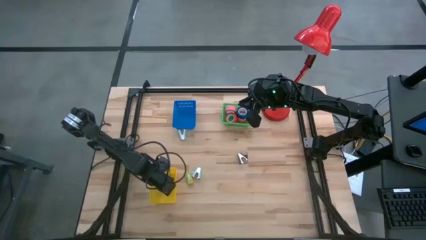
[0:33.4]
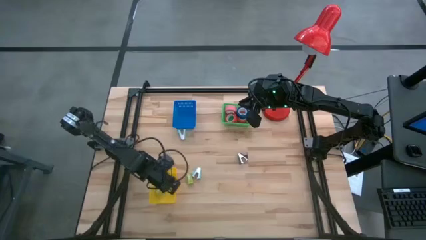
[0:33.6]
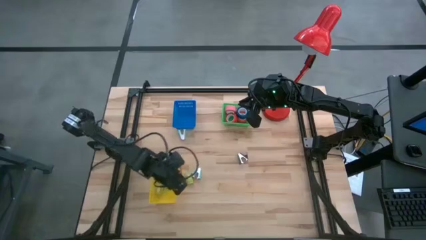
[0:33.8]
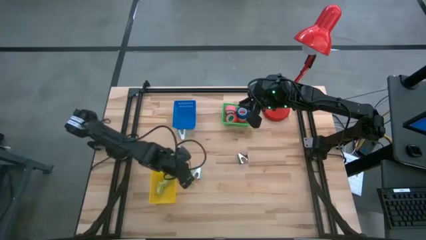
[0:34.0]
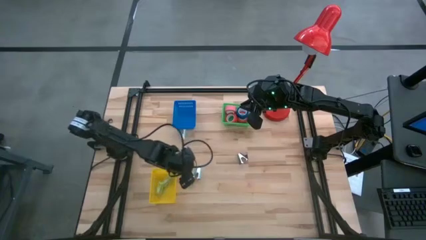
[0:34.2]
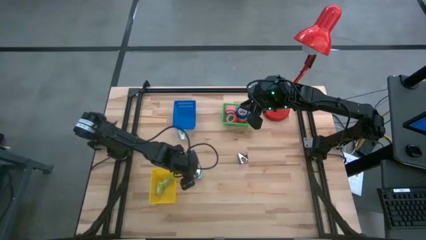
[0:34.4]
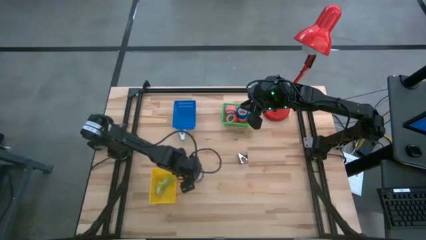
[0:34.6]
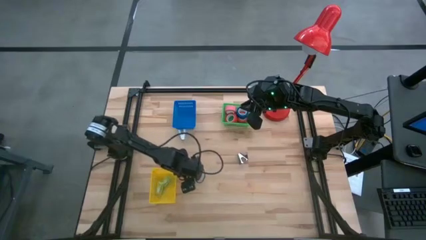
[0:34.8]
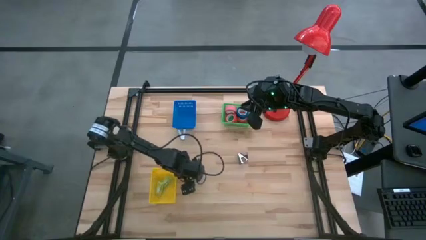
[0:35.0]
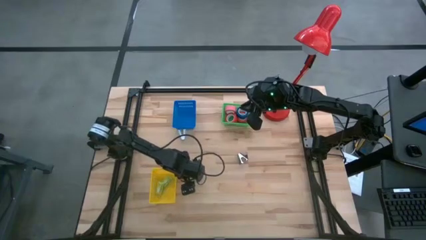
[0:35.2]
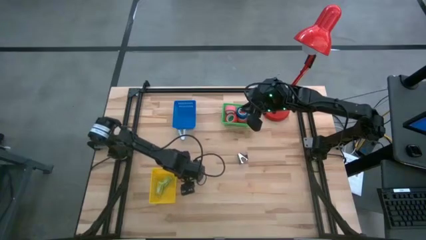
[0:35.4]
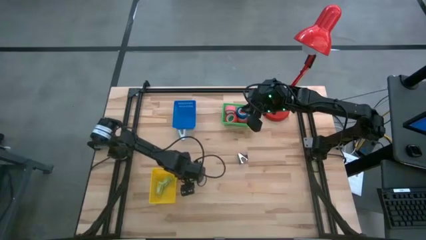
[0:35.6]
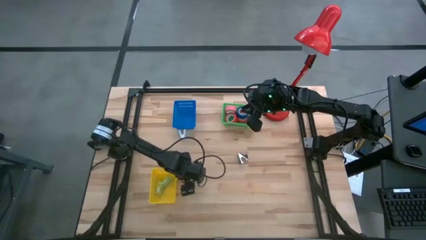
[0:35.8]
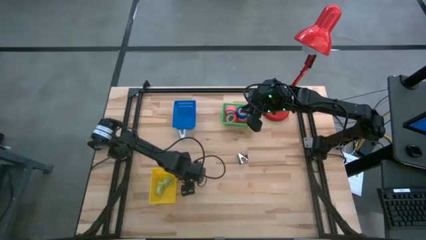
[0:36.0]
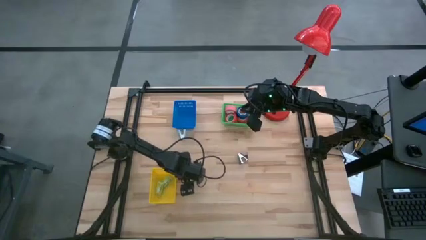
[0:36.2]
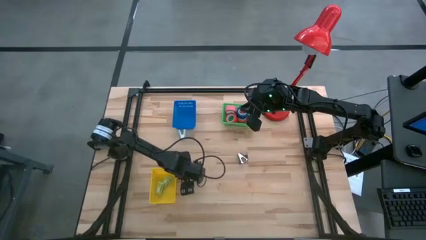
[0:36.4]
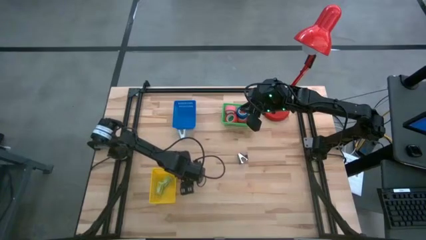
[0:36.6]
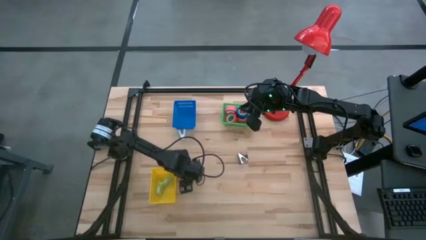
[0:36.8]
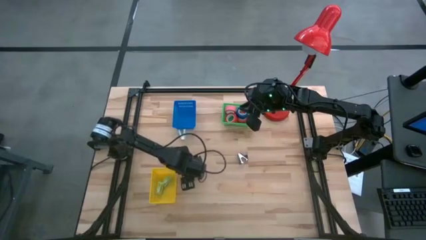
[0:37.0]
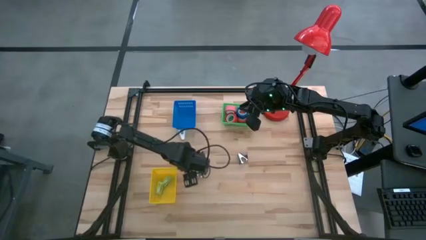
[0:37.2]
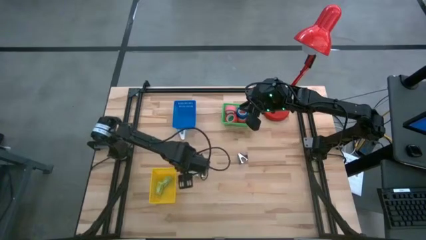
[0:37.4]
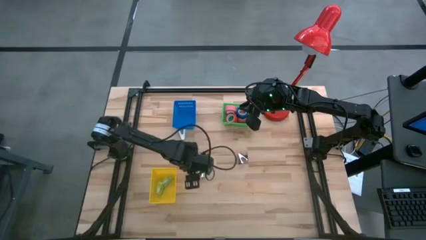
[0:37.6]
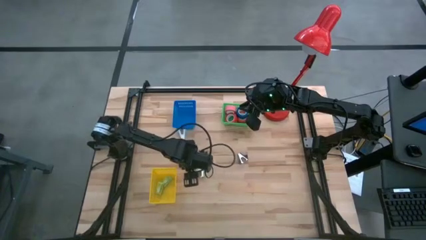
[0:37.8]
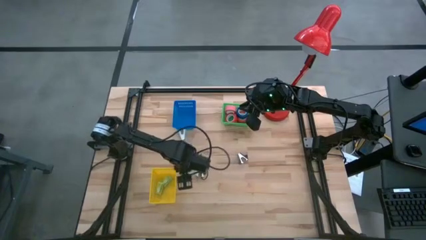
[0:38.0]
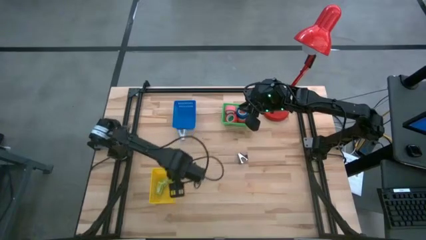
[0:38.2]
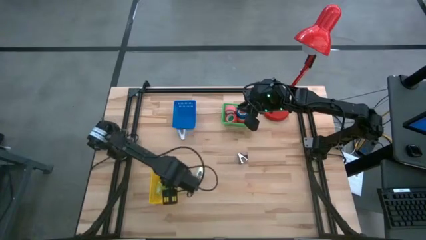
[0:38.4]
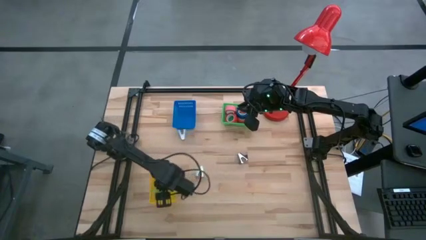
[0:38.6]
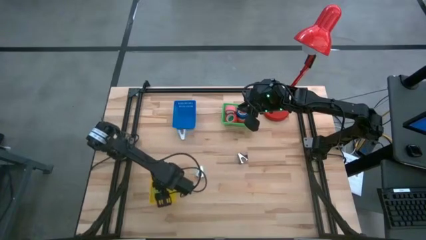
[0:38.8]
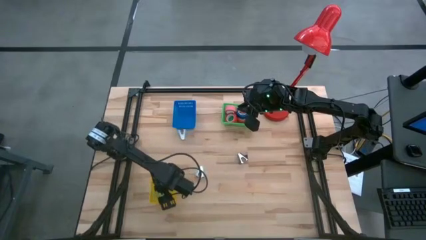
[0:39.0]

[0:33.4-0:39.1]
Task: Pick and place Stapler, Stapler remover, tape
Put the green staple pins into the yellow basket

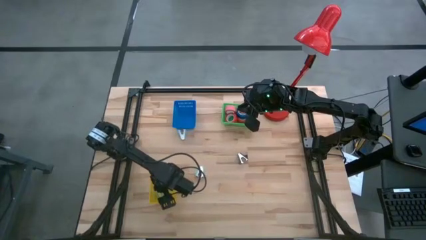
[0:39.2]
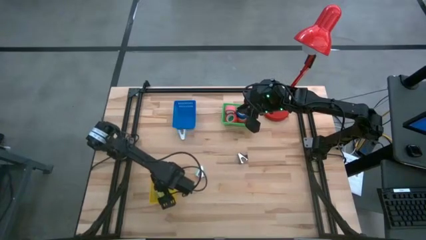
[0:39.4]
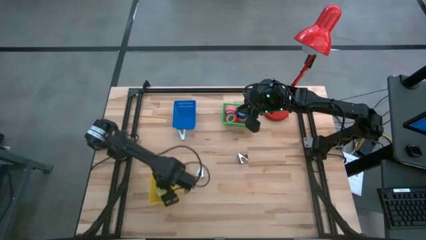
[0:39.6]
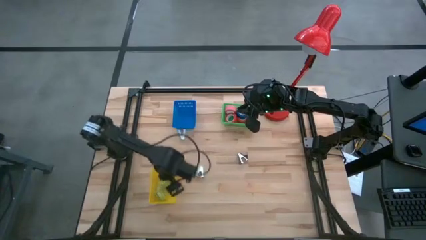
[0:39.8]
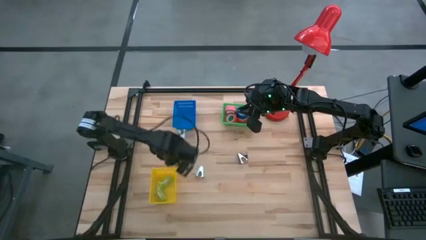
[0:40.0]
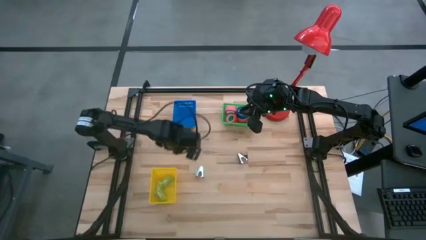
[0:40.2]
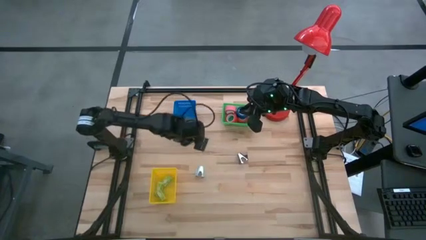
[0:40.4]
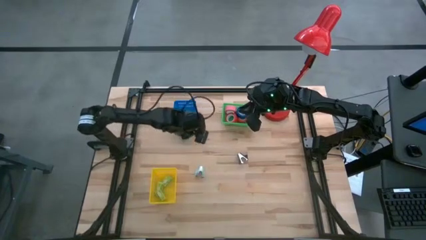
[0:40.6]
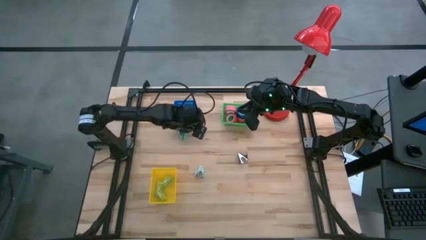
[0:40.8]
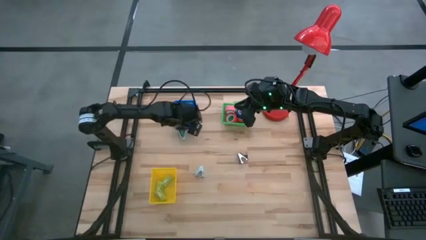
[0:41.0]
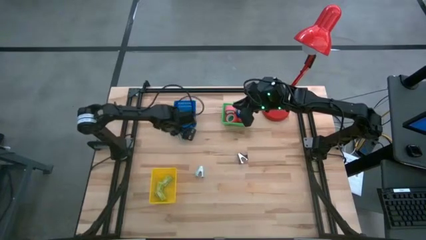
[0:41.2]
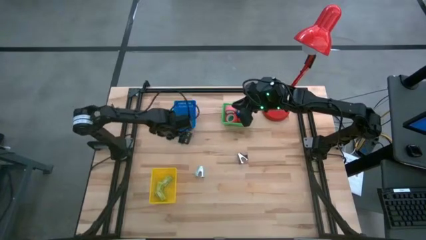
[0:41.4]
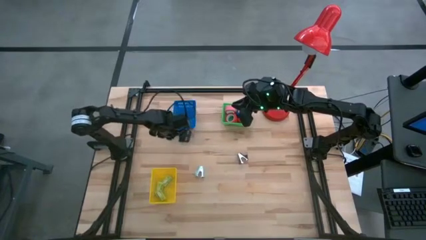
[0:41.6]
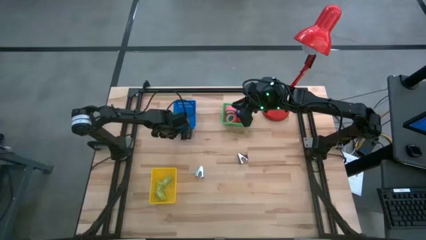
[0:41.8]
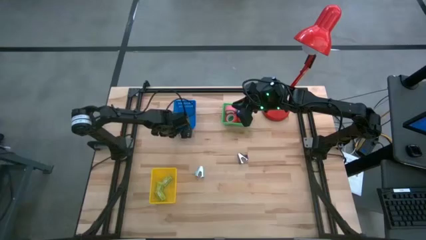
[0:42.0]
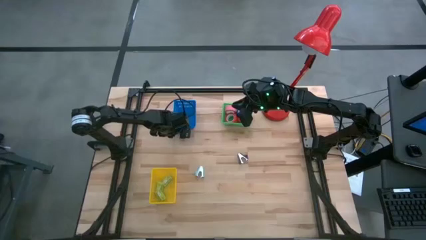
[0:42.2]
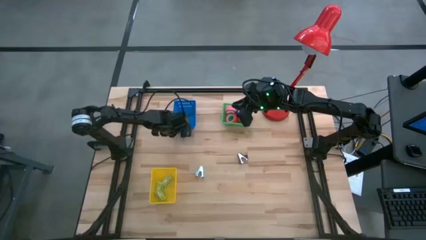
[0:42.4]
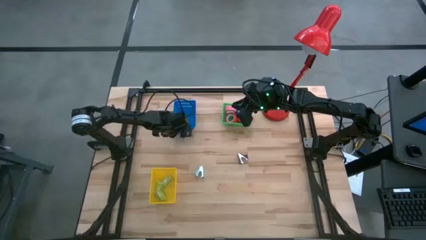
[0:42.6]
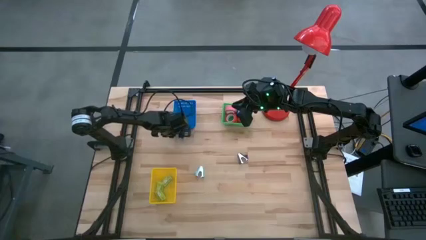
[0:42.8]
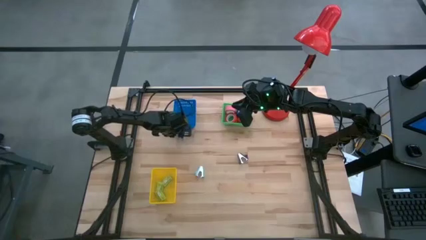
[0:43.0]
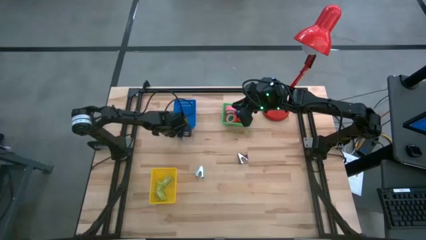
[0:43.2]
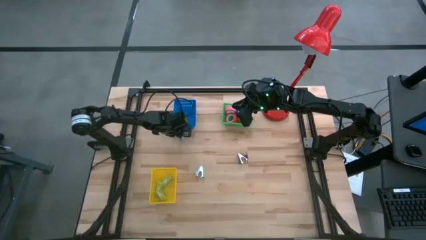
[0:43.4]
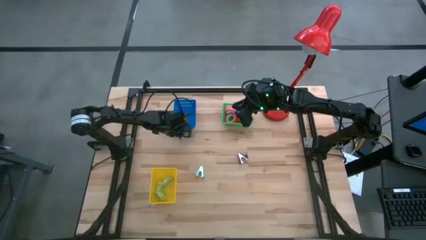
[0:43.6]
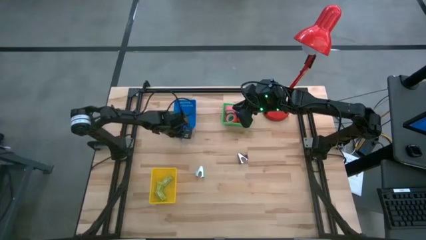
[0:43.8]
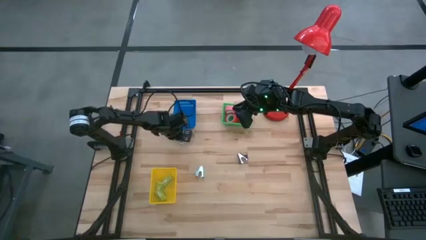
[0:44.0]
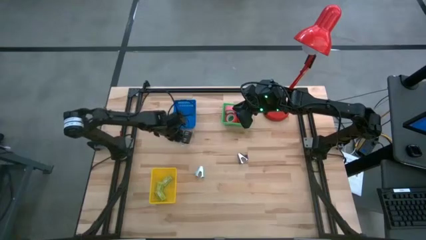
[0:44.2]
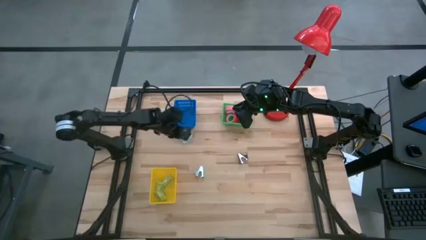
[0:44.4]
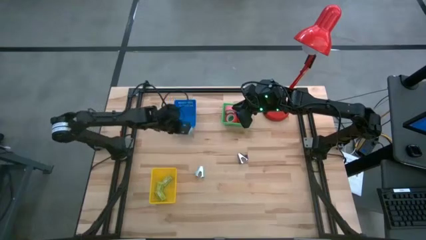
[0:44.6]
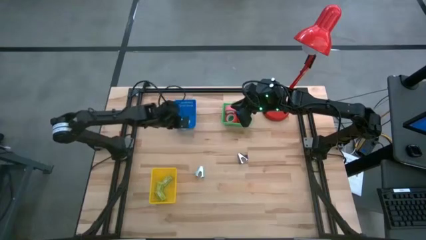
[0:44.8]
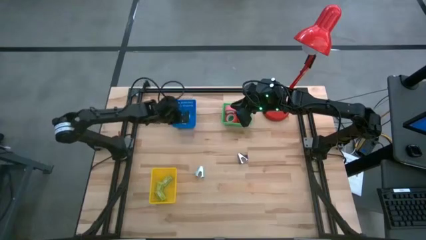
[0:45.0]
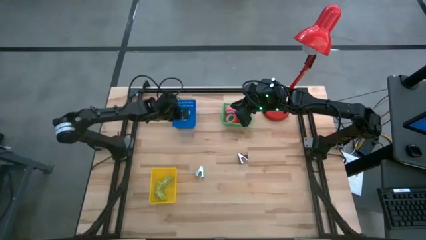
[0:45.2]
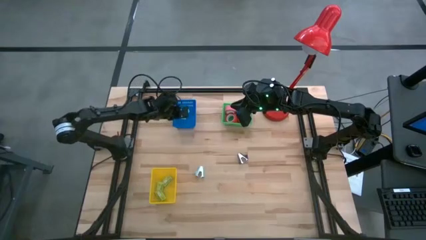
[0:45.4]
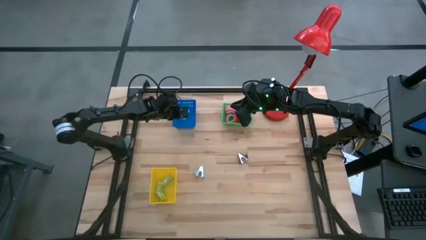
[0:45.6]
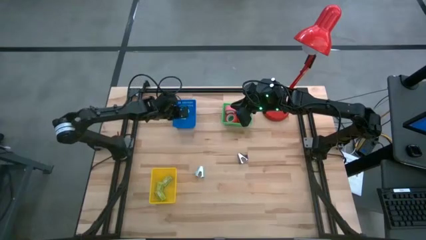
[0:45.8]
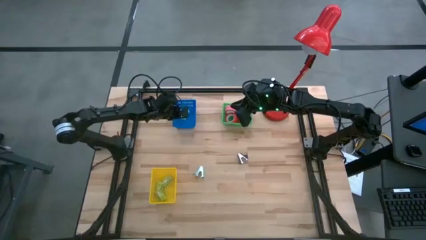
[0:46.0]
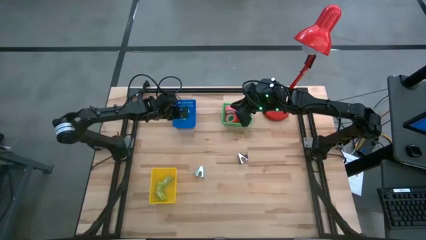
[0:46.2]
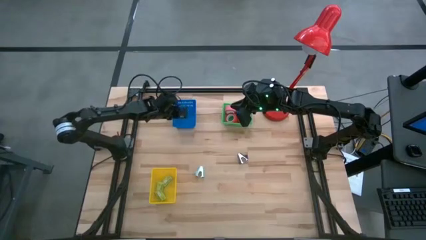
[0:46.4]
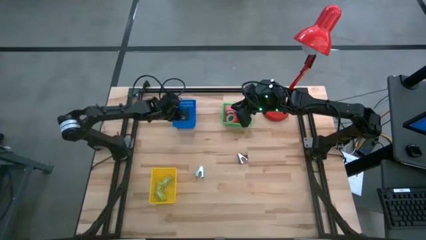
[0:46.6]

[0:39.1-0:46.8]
Put the top sky blue staple remover into the blue basket

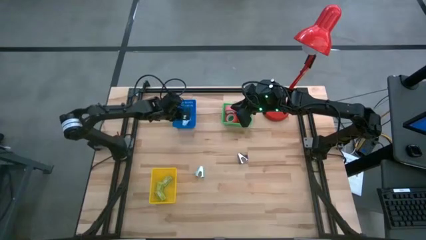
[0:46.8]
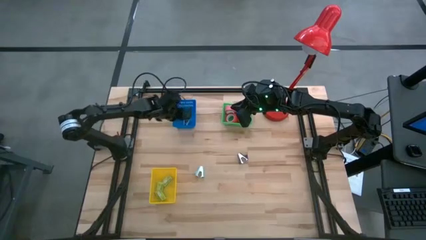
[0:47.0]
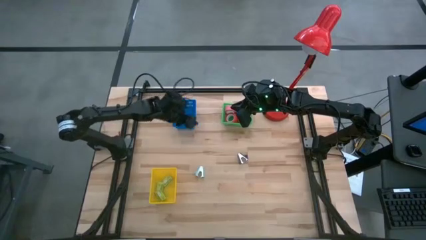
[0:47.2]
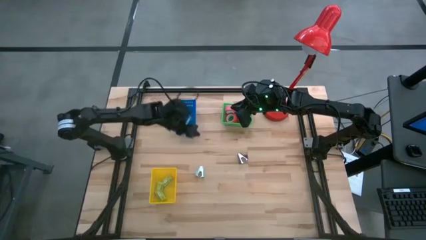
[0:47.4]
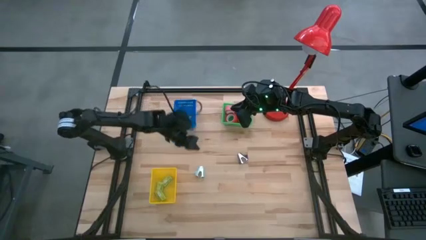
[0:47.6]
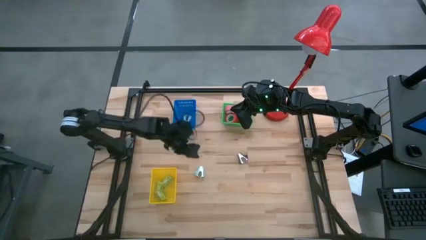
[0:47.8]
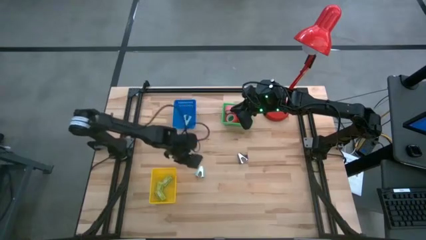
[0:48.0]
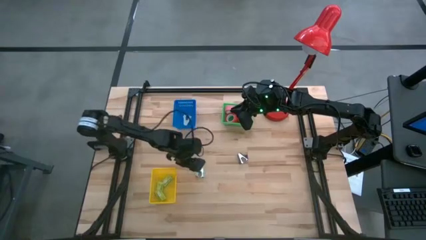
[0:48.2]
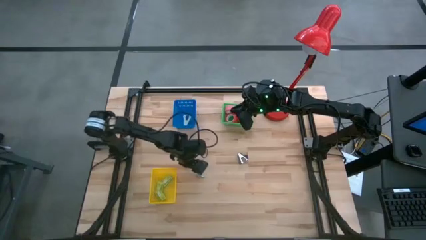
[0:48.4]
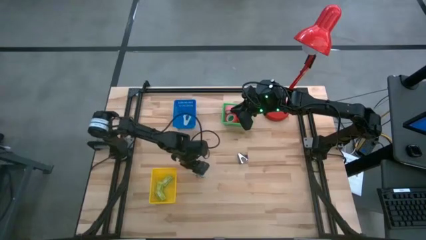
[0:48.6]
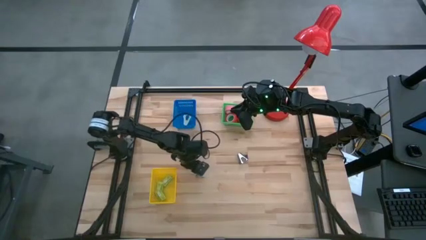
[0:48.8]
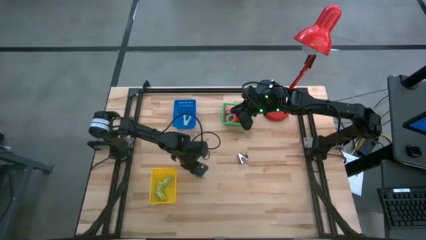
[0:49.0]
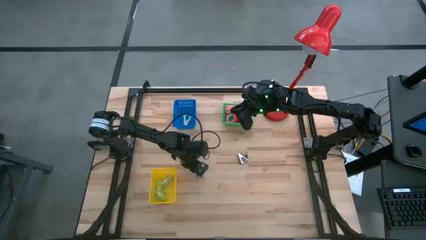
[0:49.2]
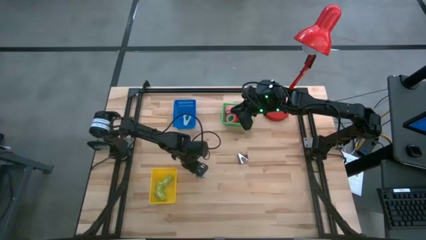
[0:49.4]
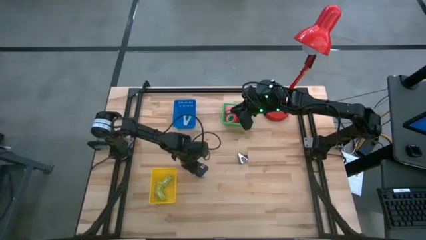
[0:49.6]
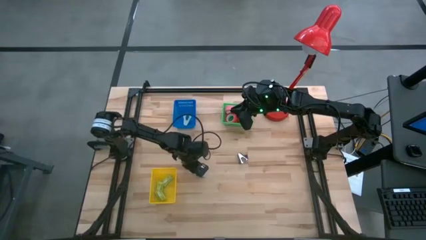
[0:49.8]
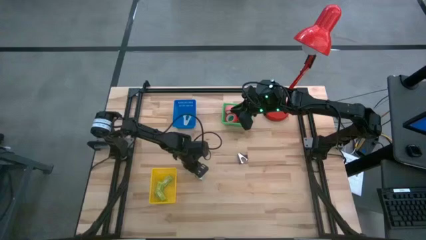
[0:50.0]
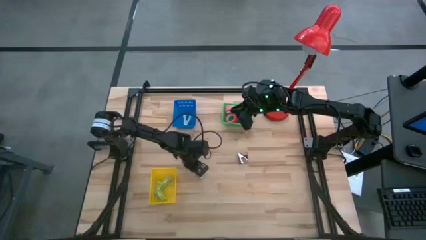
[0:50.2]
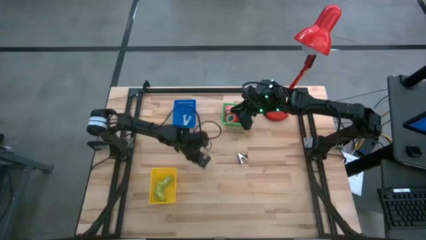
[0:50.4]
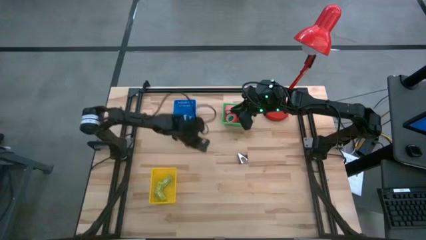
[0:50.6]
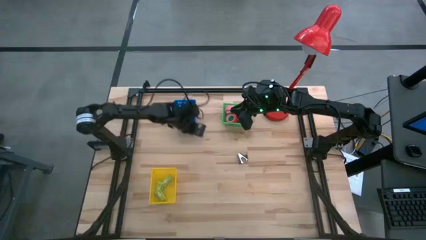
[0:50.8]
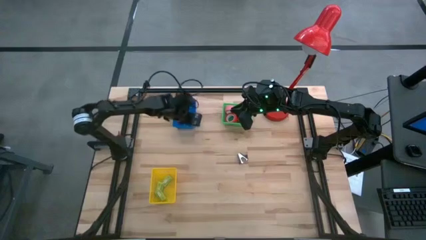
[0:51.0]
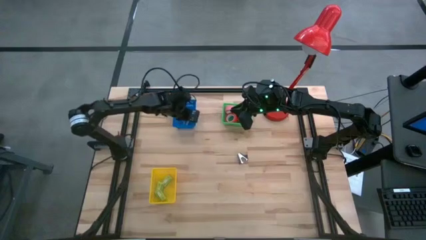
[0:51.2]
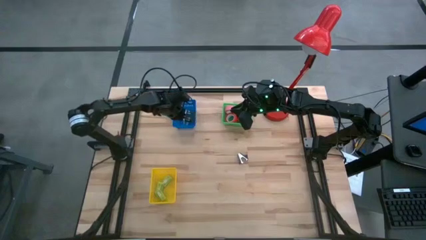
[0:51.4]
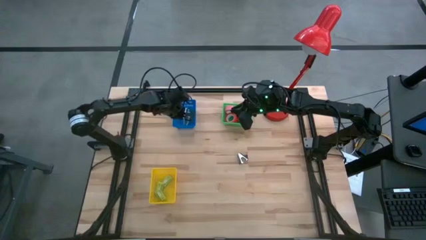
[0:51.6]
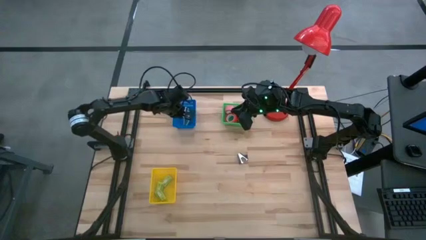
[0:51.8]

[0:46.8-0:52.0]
Put the sky blue staple remover into the blue basket
